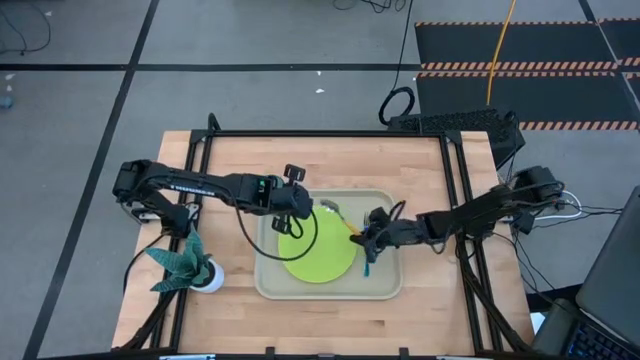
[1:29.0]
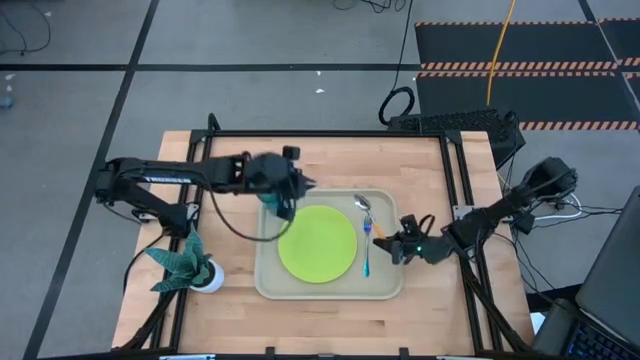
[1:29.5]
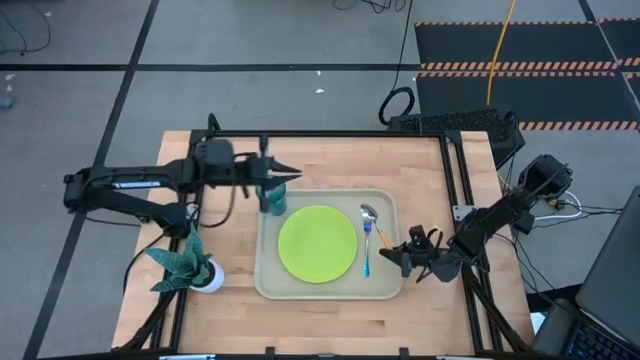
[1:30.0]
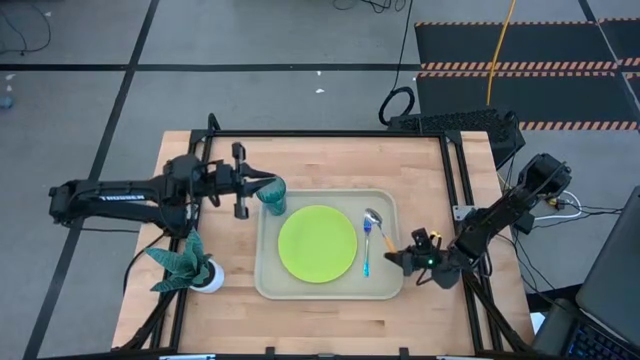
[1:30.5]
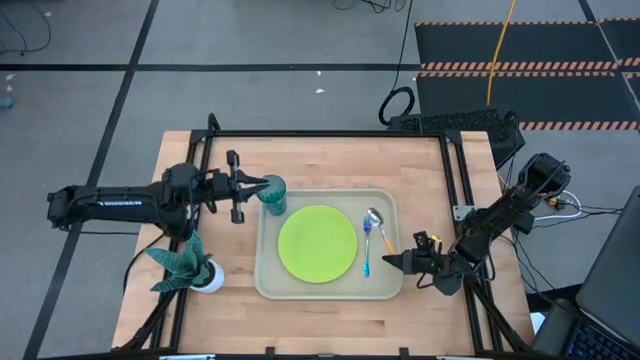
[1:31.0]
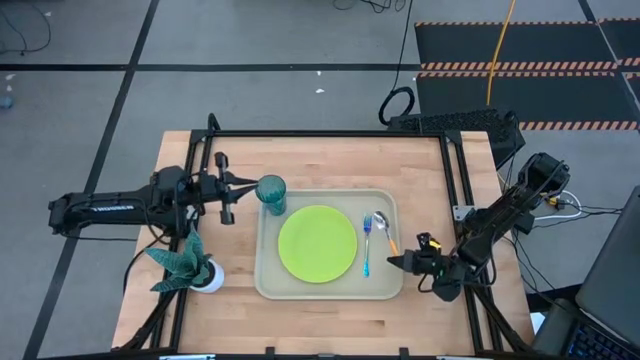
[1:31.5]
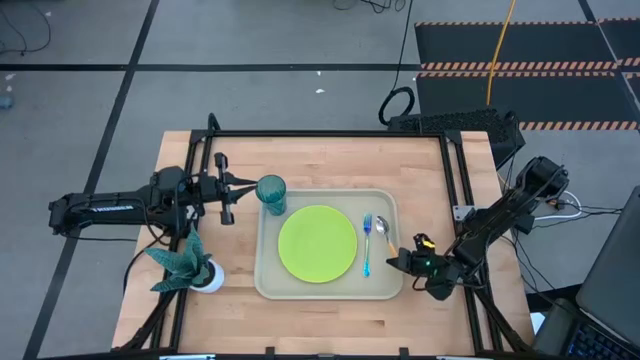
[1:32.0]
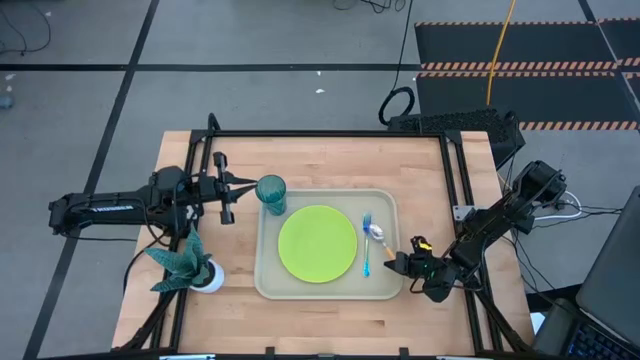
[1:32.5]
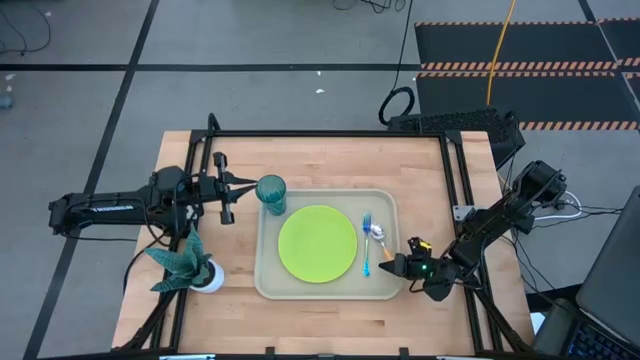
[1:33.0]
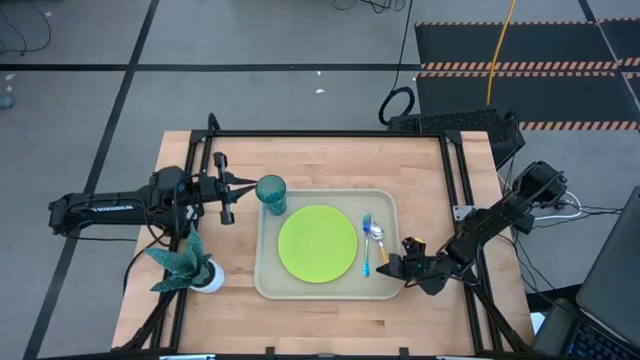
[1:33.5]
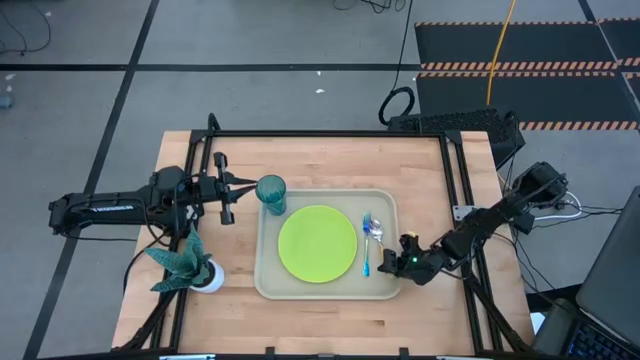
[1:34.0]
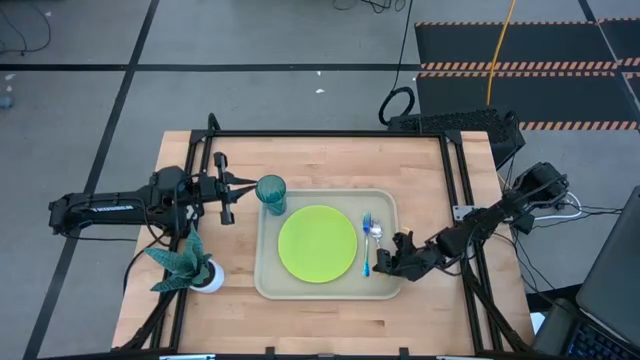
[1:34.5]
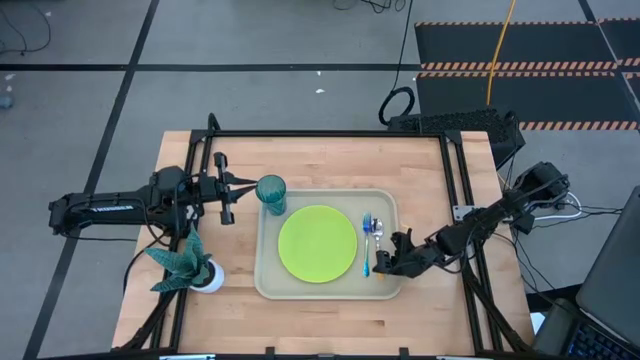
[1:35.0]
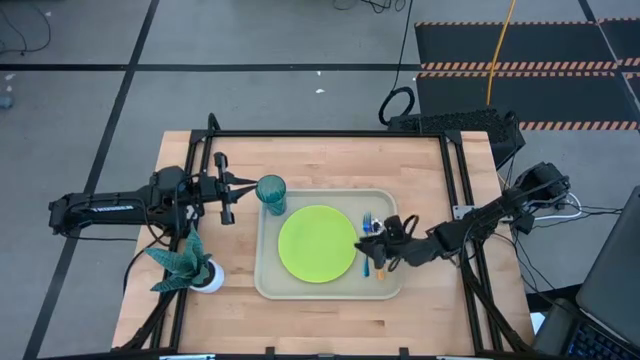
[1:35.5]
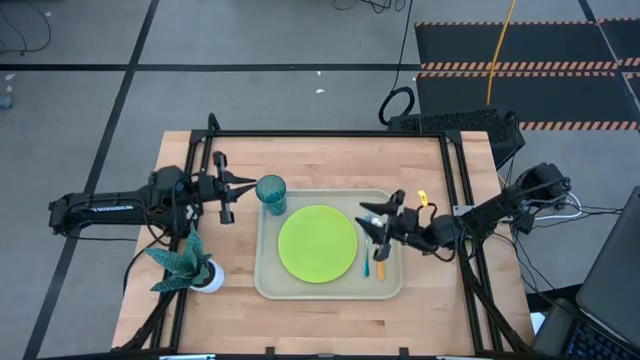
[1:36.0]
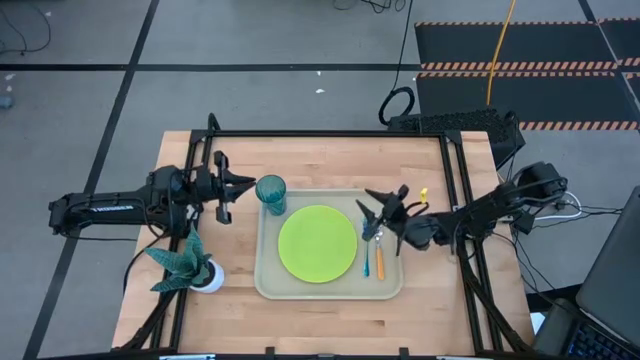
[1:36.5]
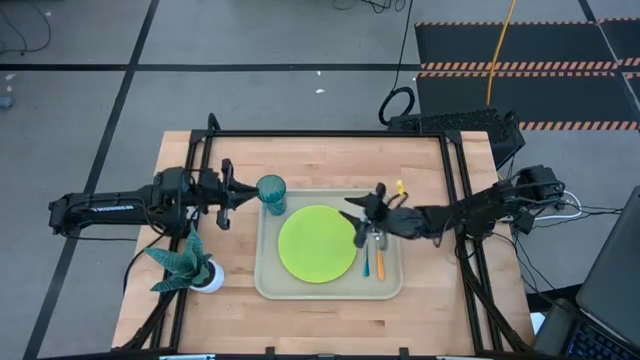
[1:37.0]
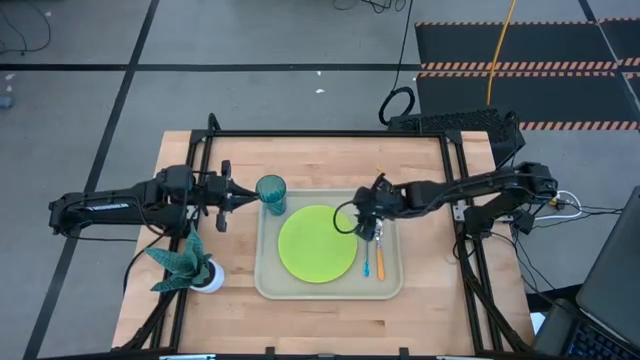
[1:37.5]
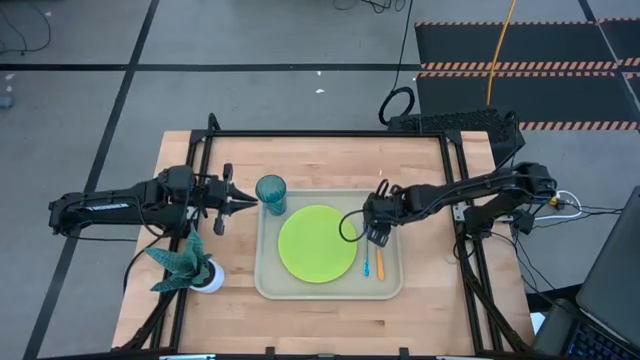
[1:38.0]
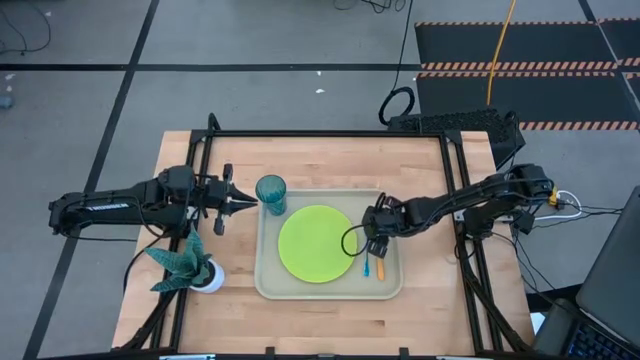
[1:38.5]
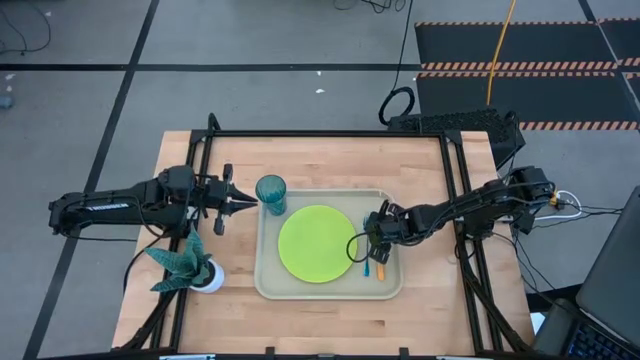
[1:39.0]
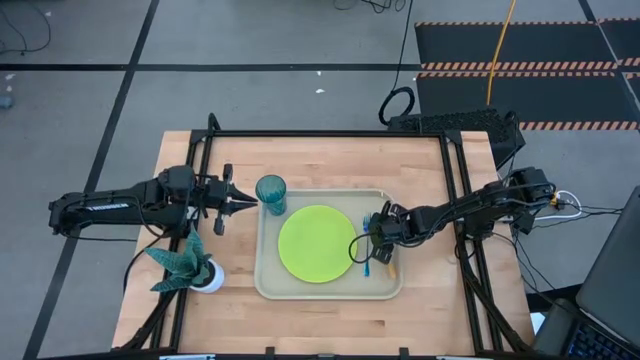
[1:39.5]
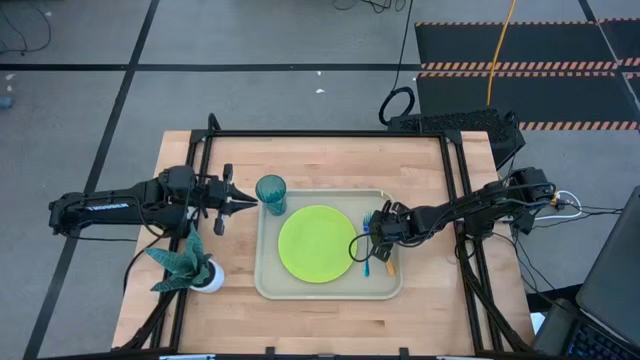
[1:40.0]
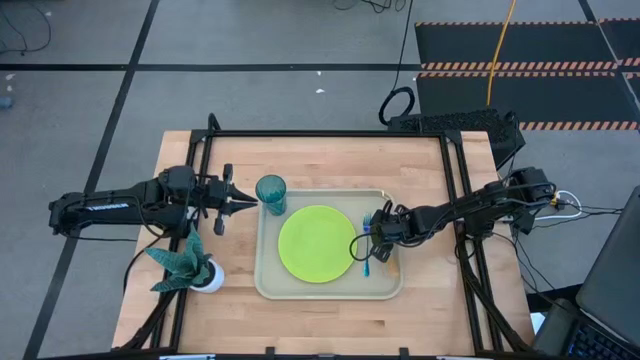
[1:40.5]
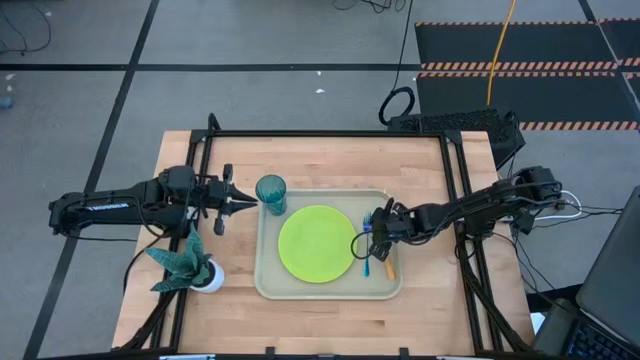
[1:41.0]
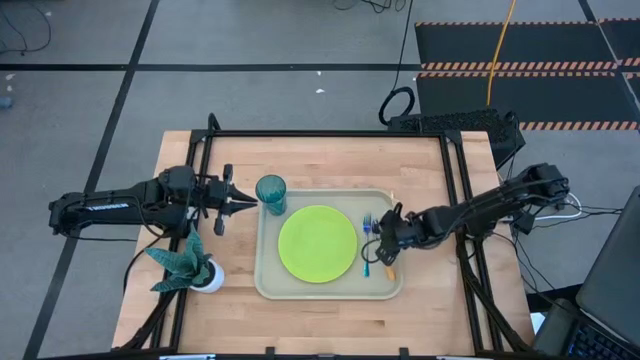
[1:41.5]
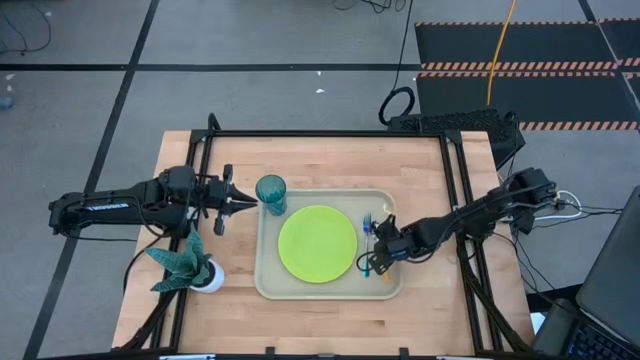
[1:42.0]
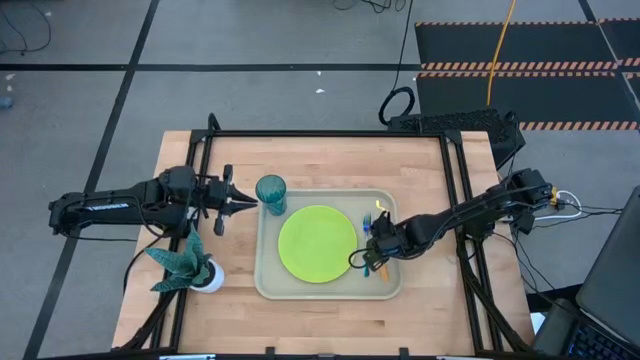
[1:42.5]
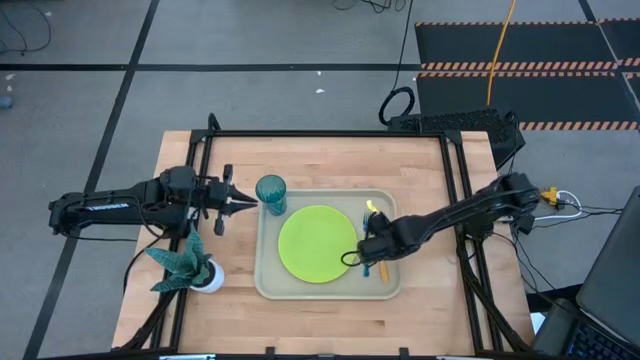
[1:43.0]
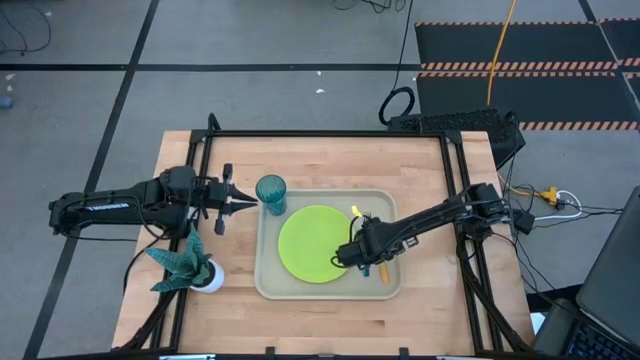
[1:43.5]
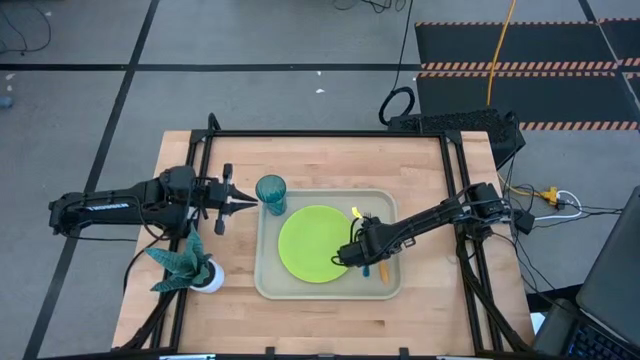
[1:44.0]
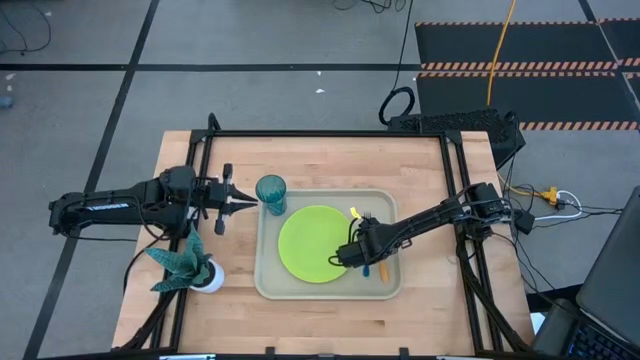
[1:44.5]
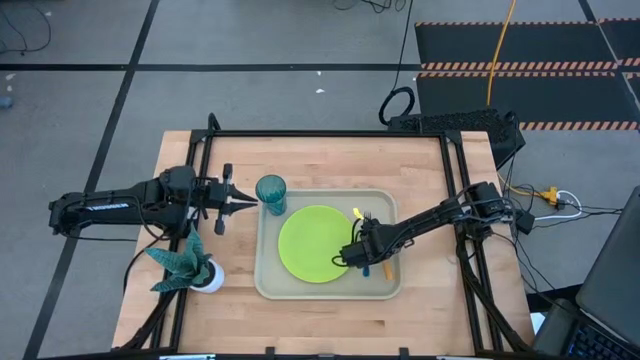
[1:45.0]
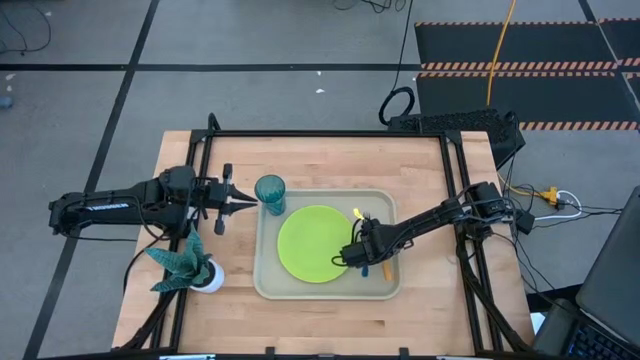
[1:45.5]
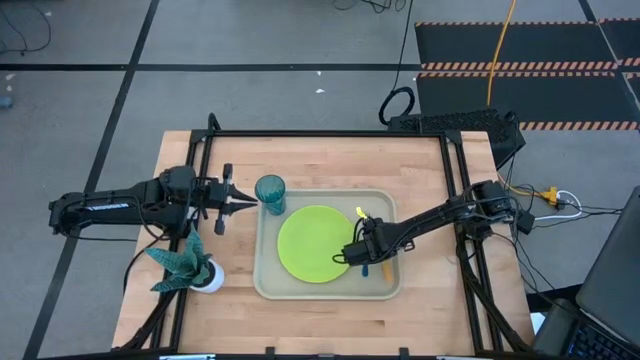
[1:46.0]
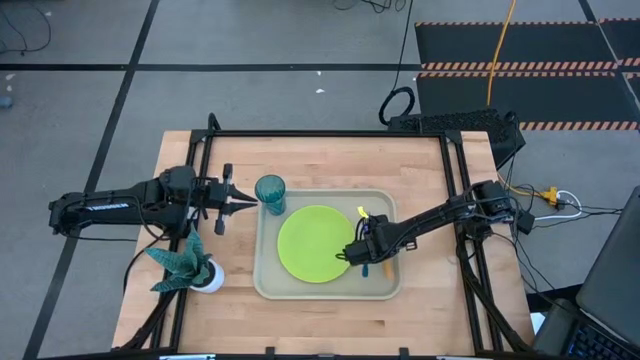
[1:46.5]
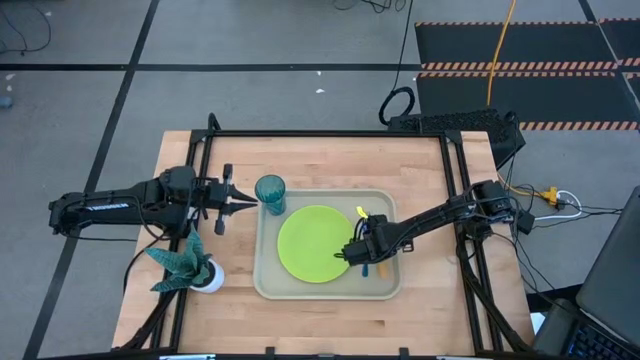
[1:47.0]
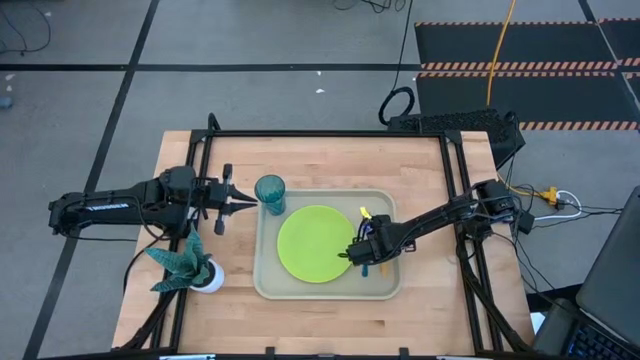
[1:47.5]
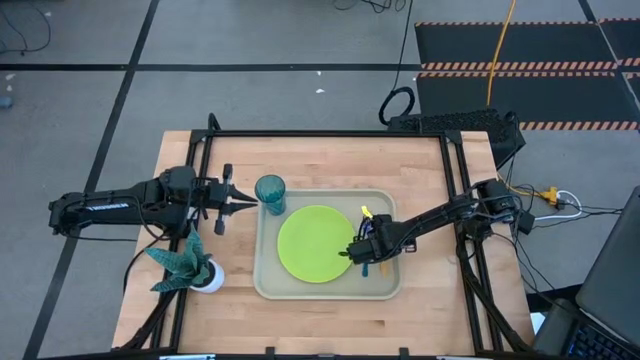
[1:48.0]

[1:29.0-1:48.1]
Task: Pick and place plate/cup/fork/spoon on tray
Put the yellow spoon on the gray serving tray

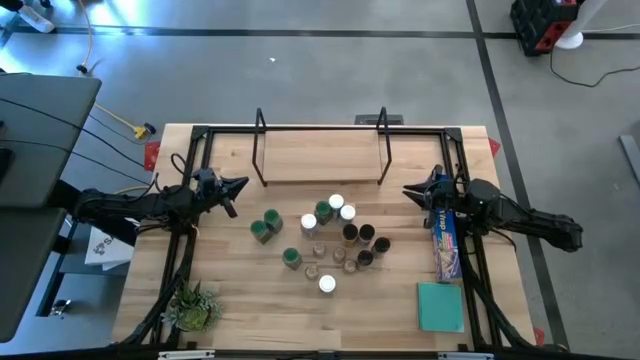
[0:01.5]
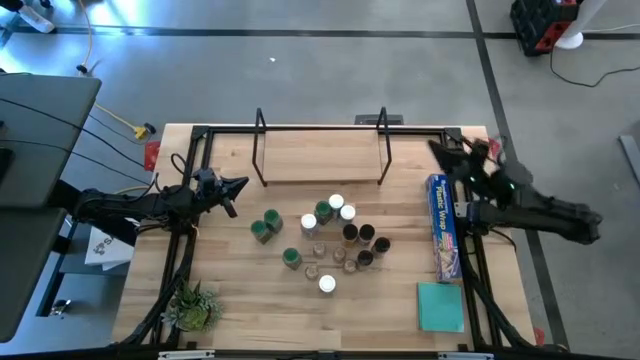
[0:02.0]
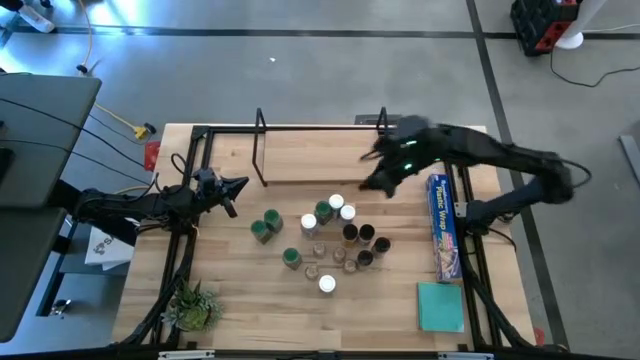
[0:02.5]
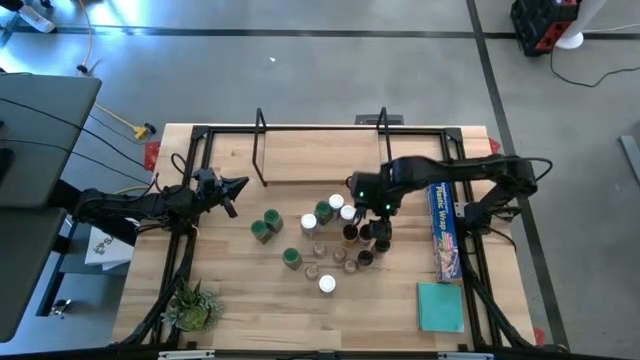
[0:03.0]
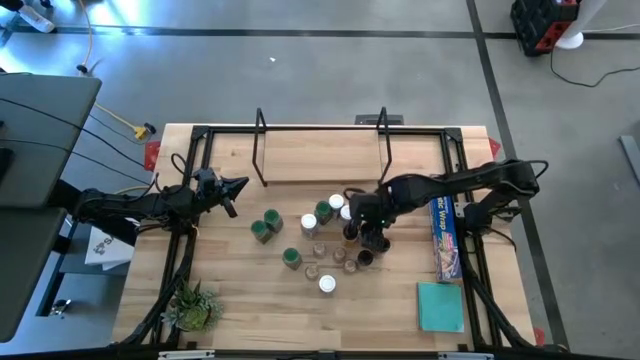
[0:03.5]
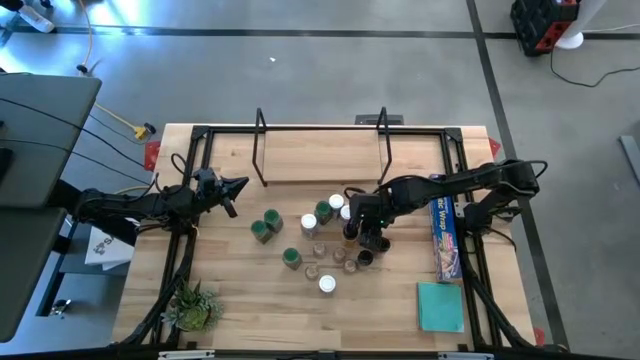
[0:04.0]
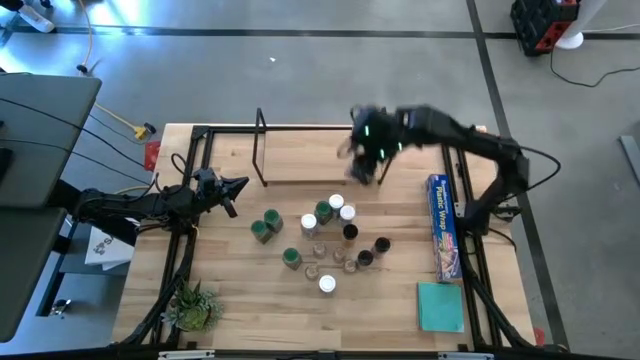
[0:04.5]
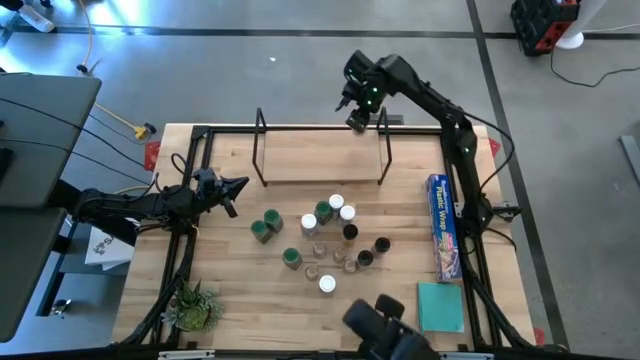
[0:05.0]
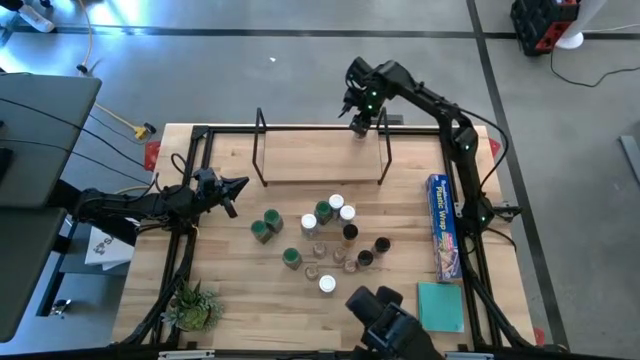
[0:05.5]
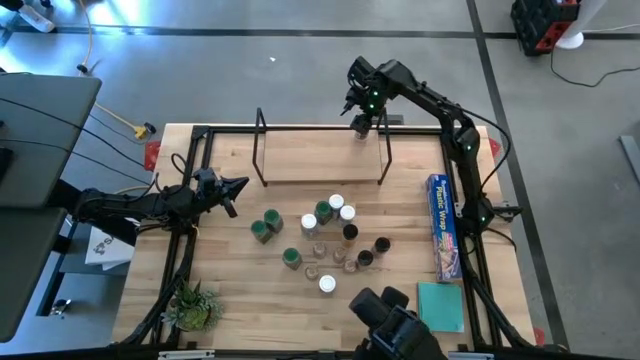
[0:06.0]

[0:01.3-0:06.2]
Task: Shelf spices
Put the violet seasoning bottle on the shelf
